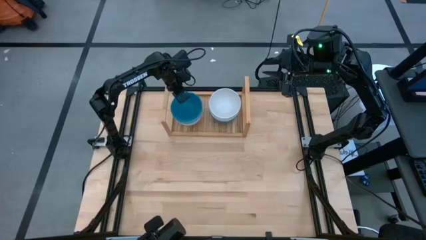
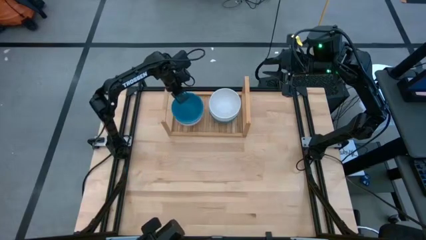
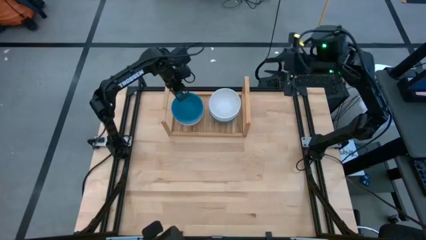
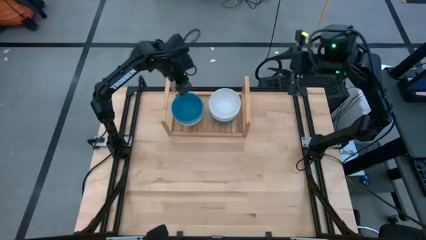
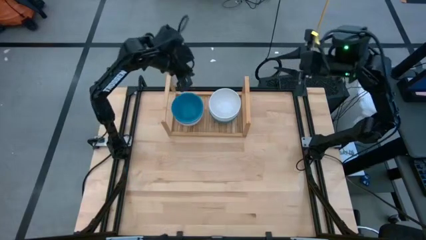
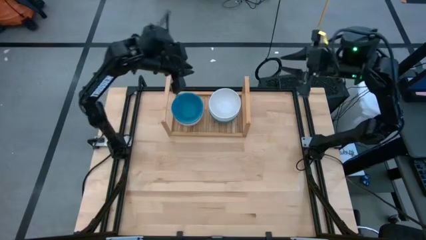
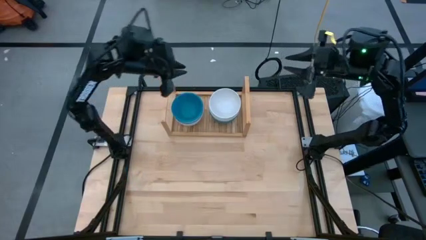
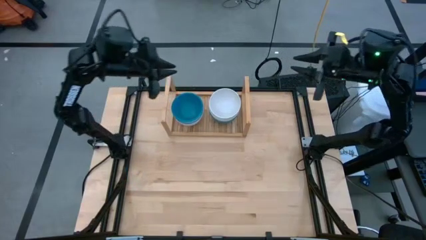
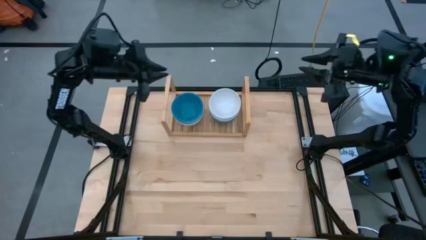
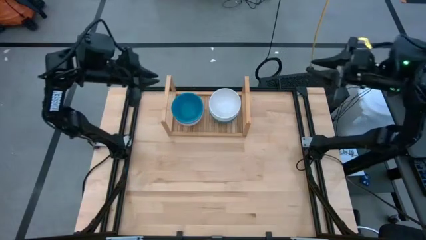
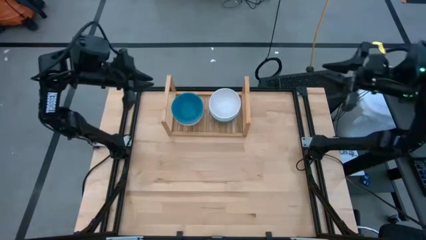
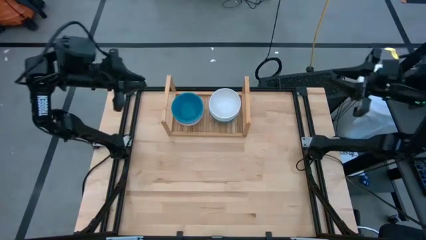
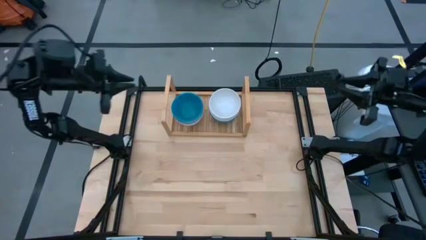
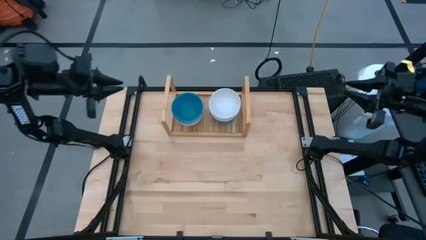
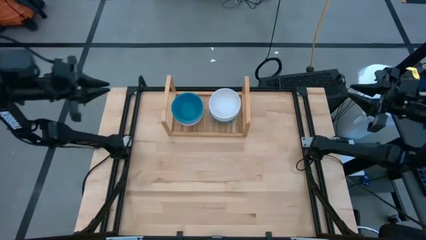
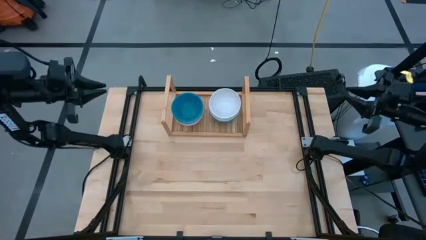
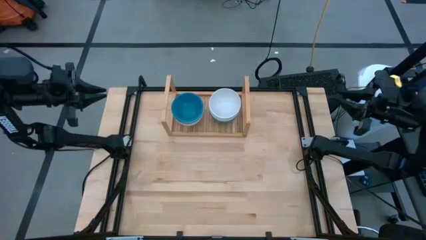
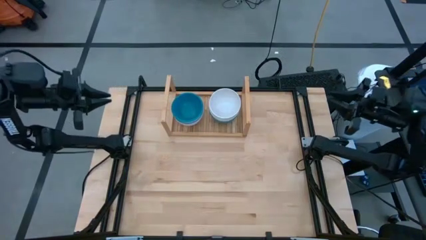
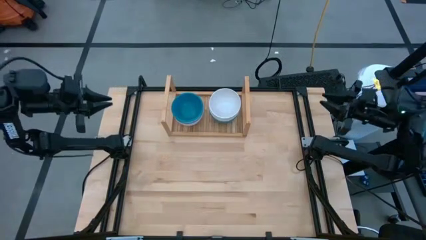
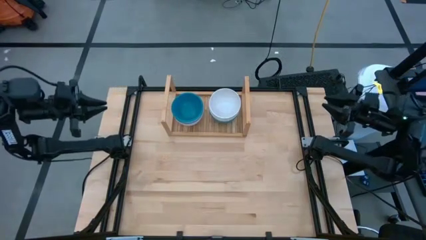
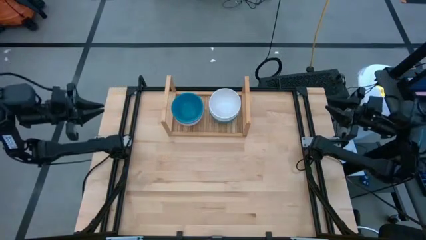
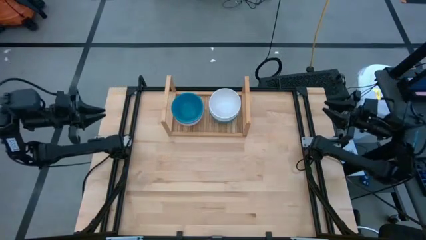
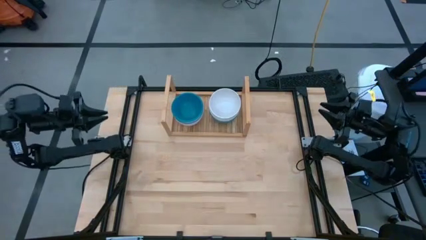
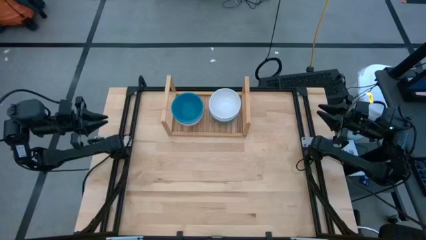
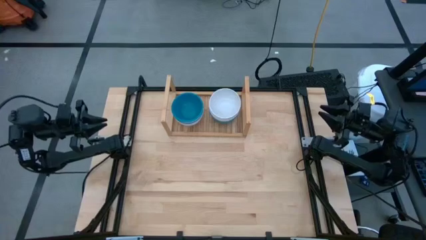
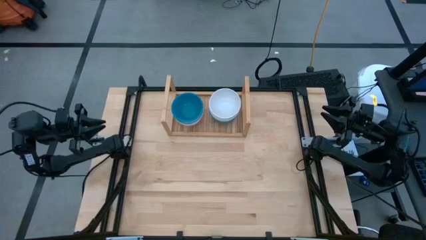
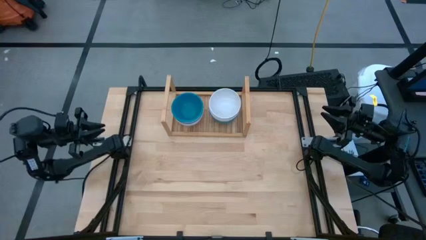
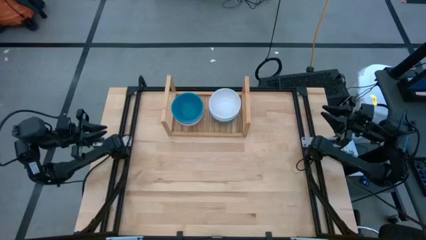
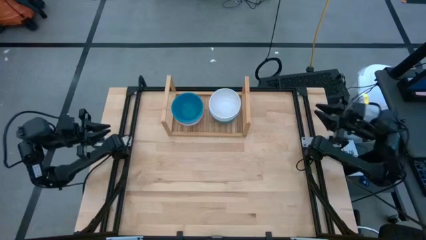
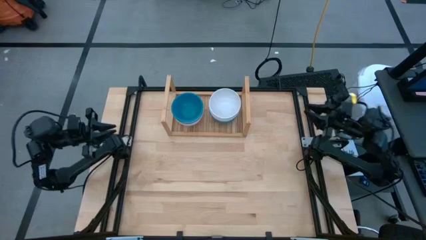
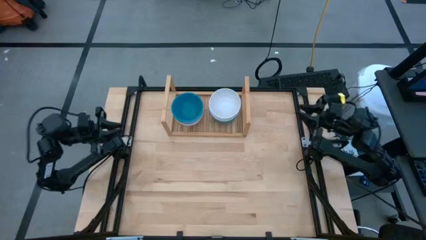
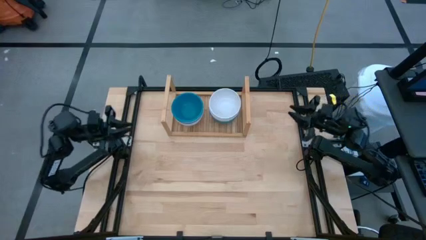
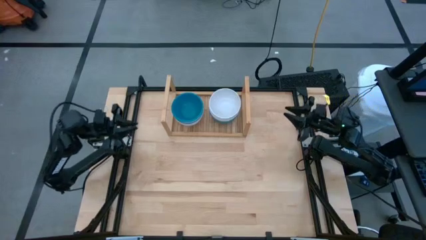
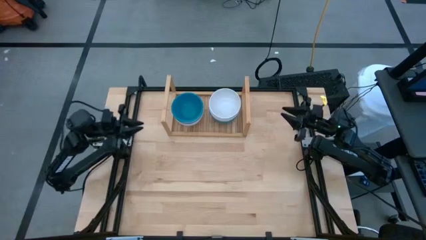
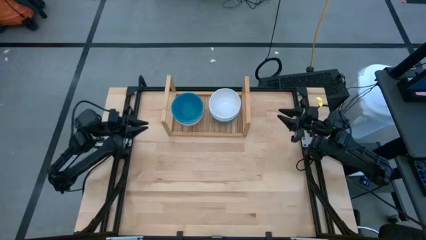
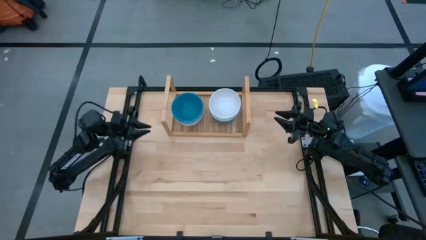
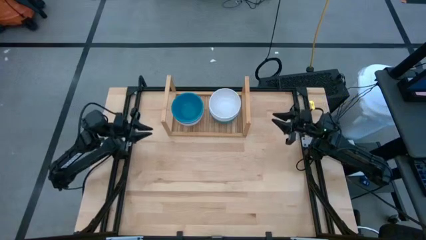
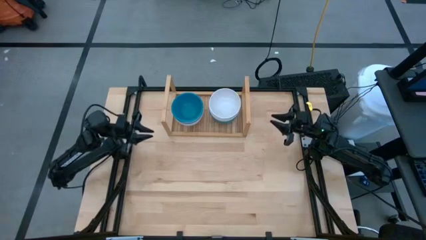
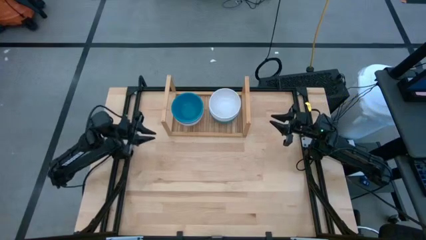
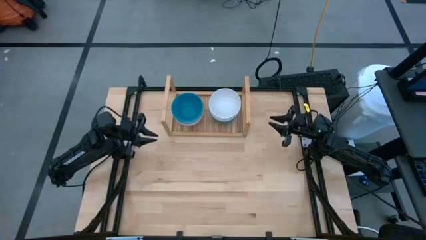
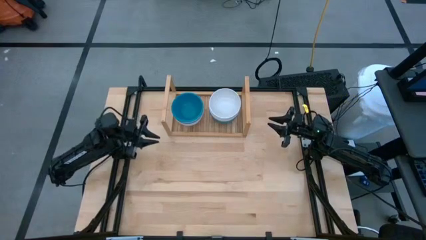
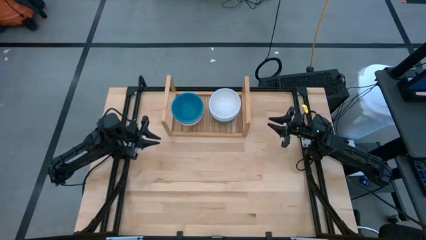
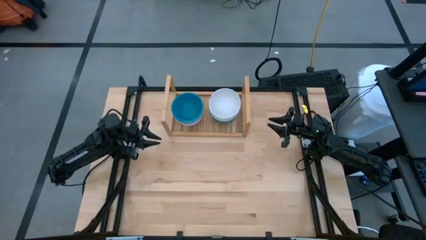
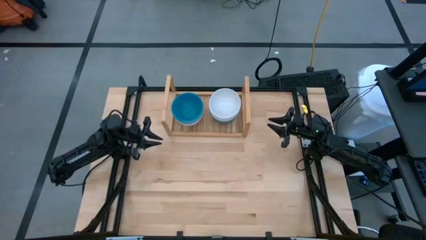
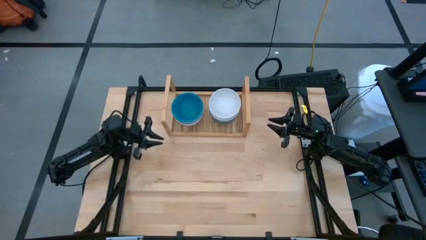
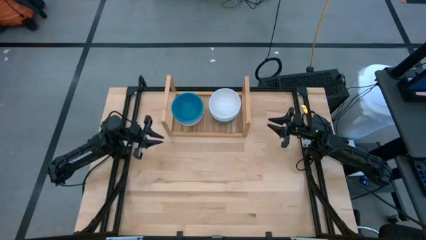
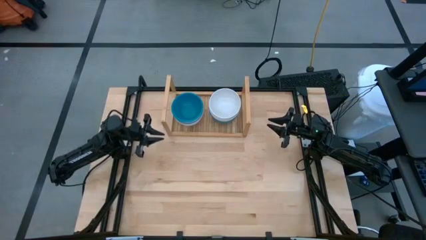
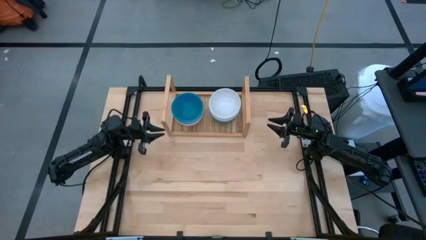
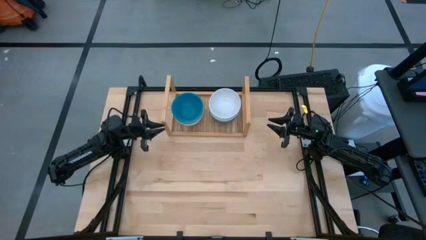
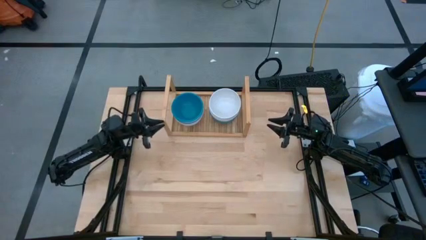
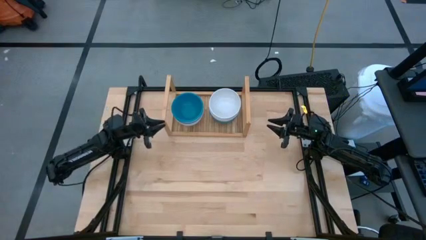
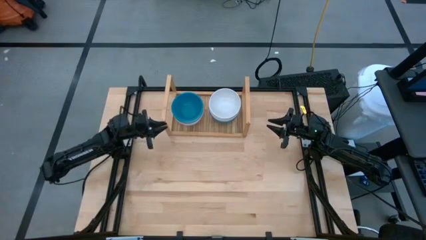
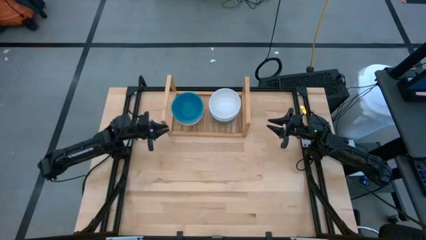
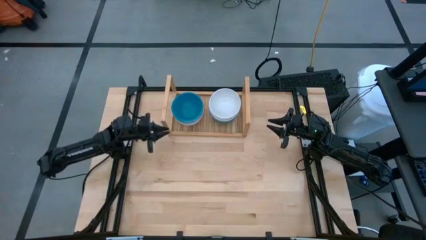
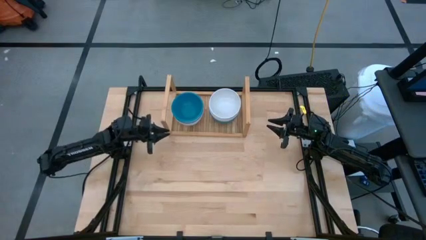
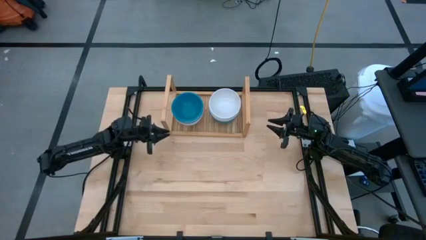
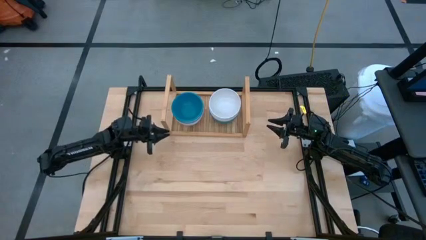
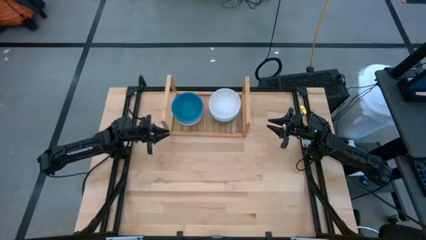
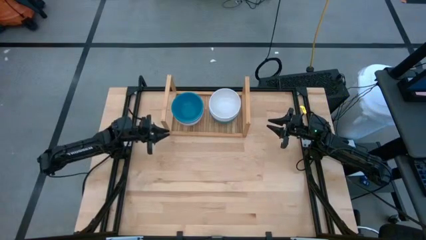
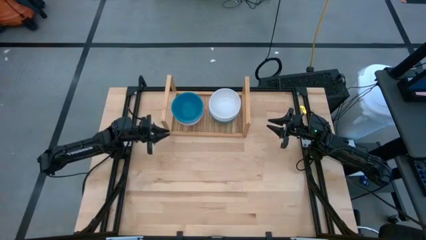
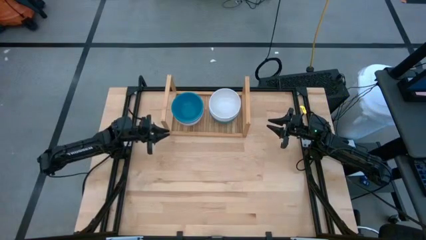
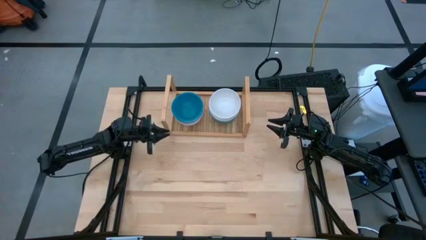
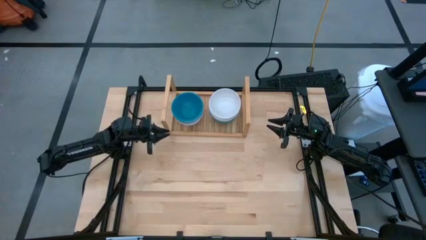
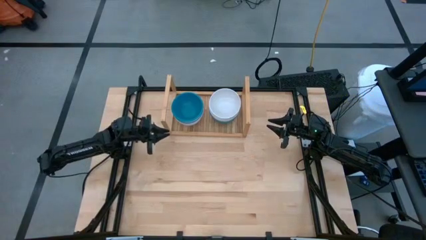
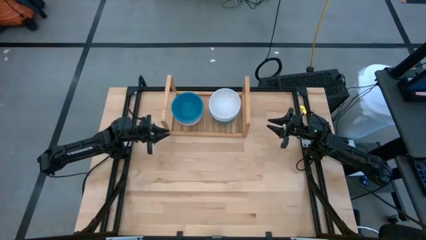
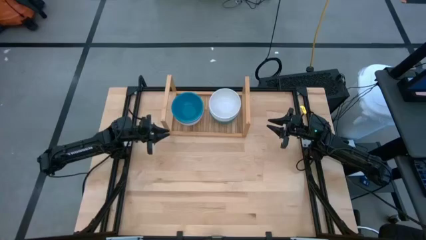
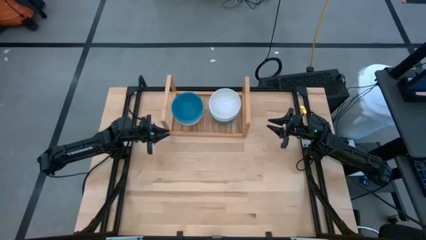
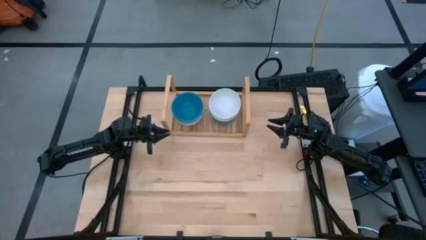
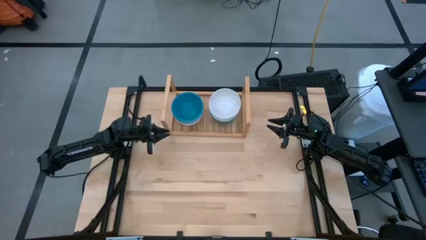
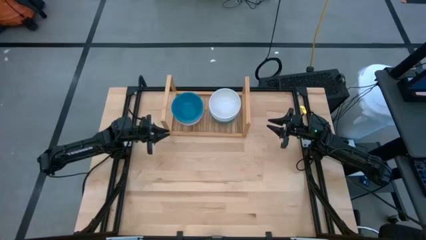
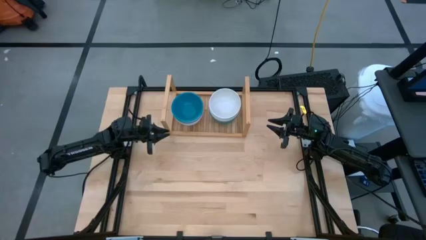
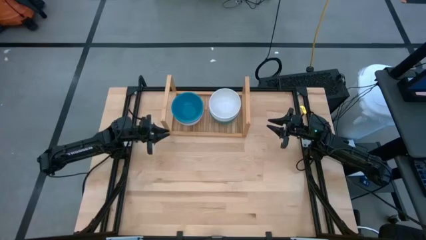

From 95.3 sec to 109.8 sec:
Task: Place and stack bowls onto a shelf
Return to Home Position

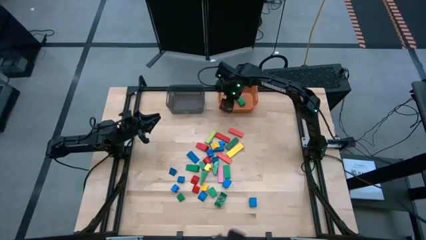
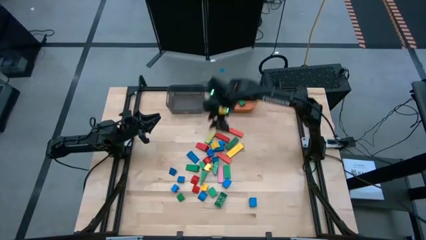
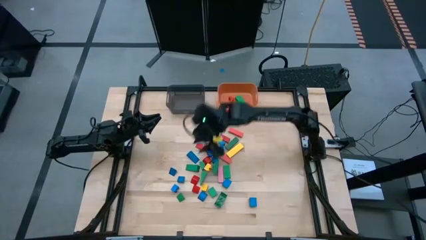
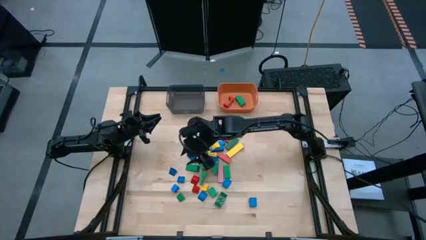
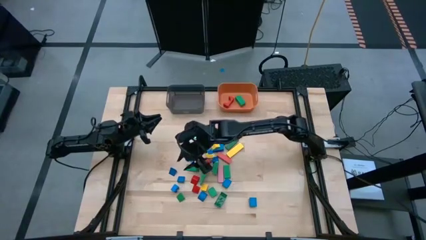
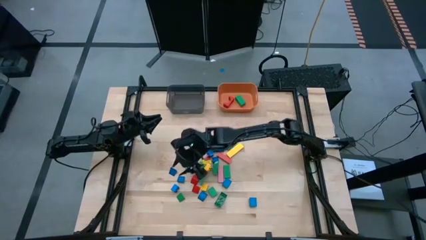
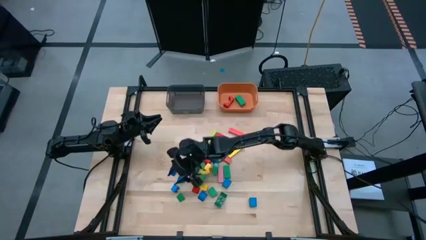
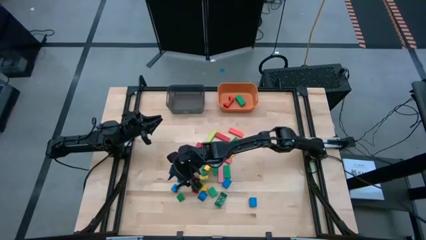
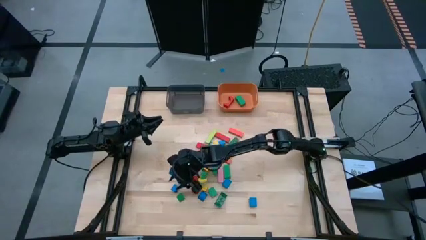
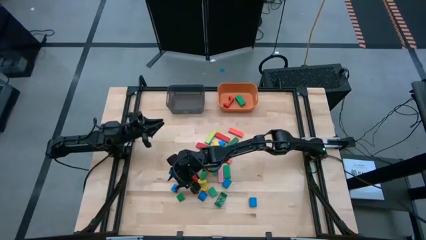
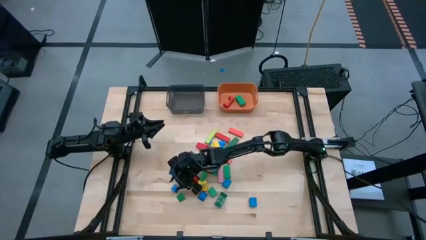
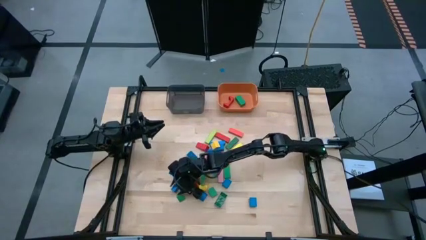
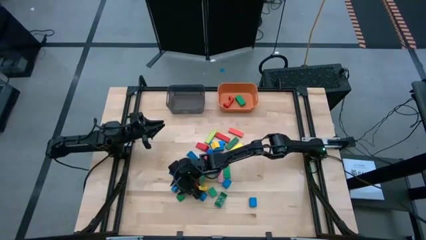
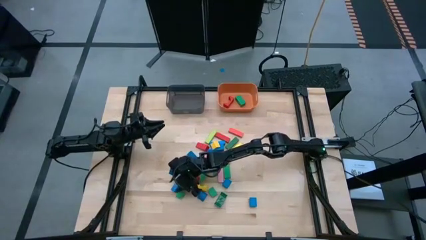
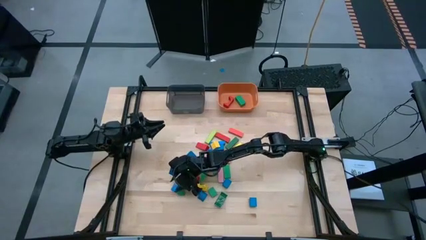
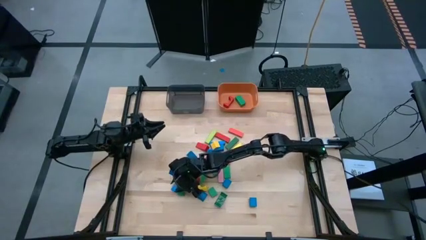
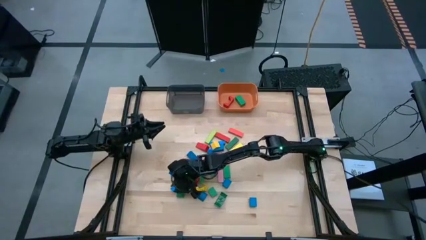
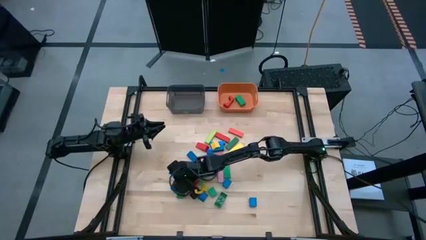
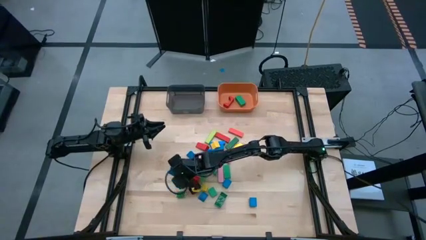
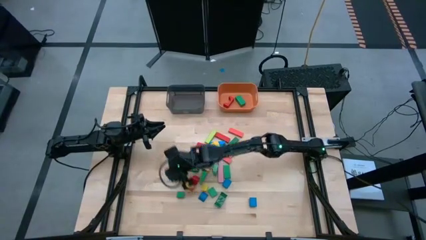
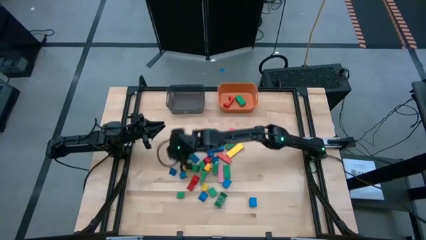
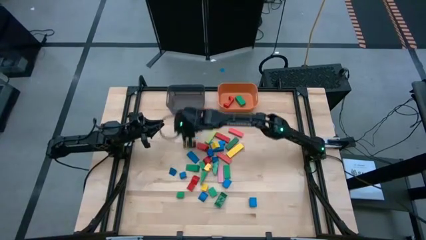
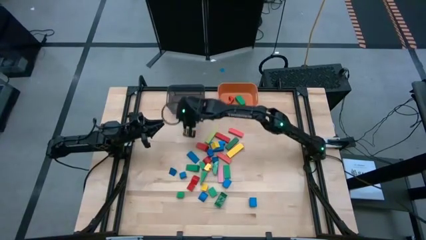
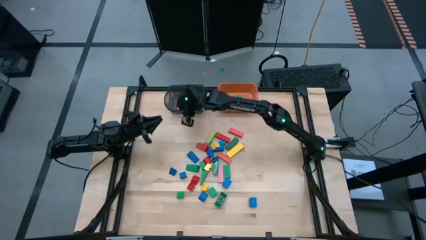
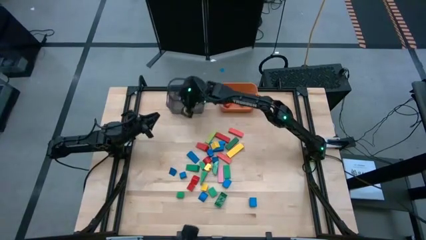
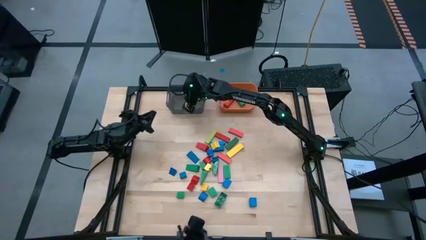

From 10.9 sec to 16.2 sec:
Task: Sort blocks by size
Put the small blue game piece into the black bin
